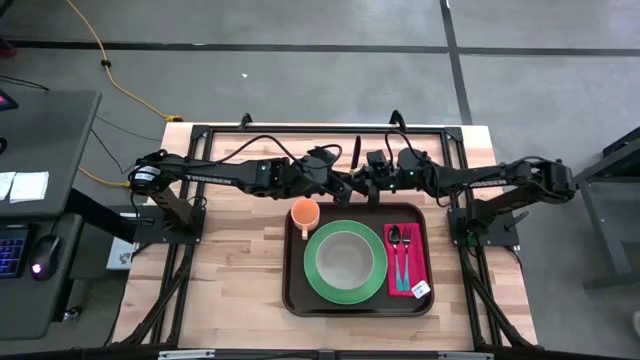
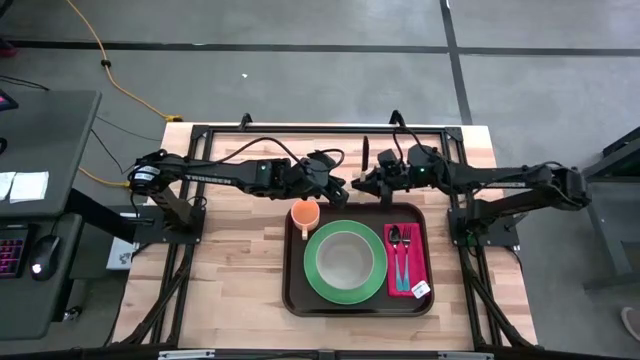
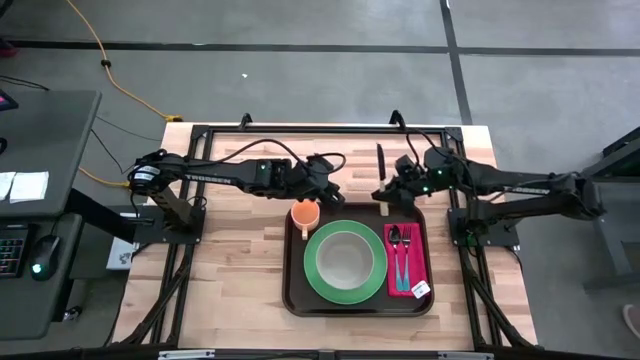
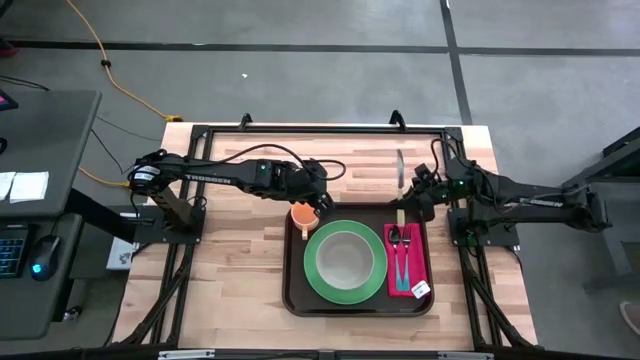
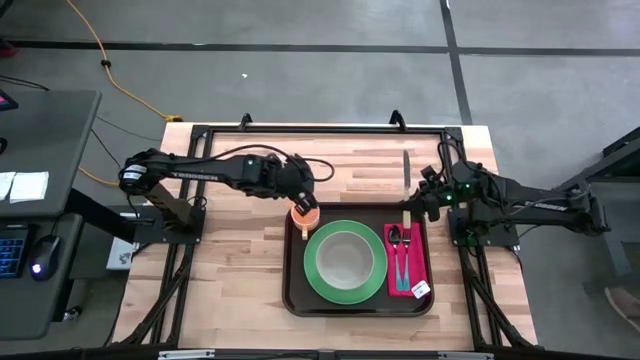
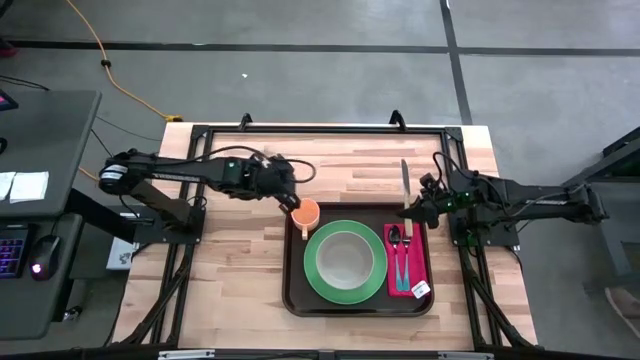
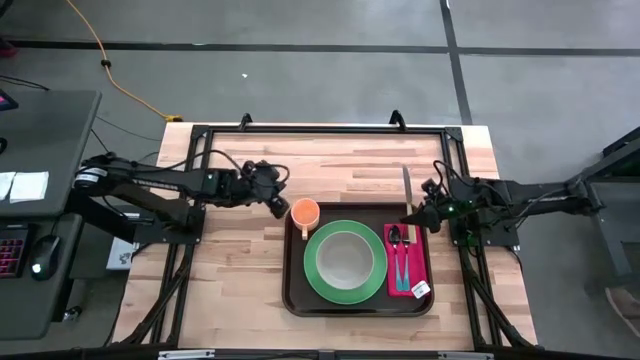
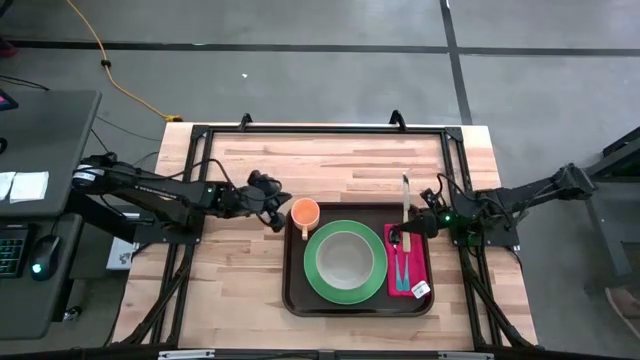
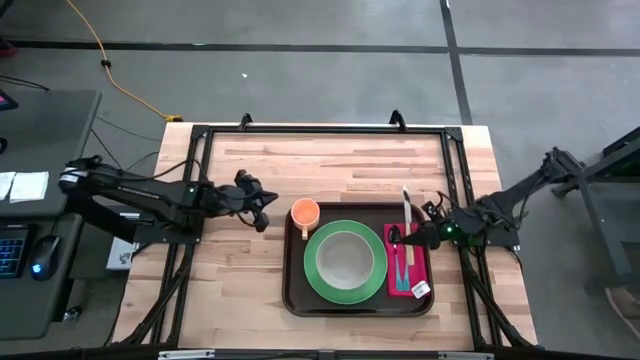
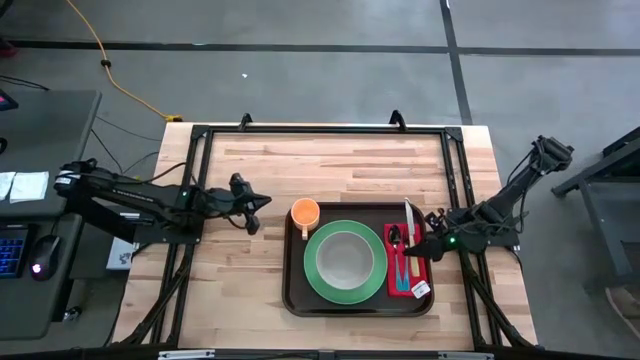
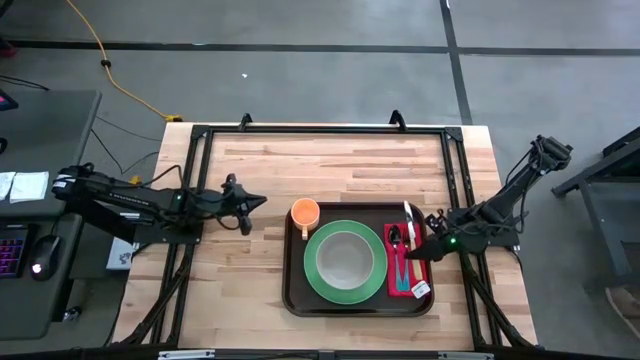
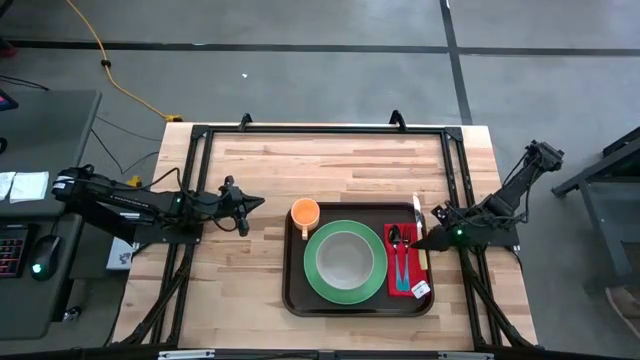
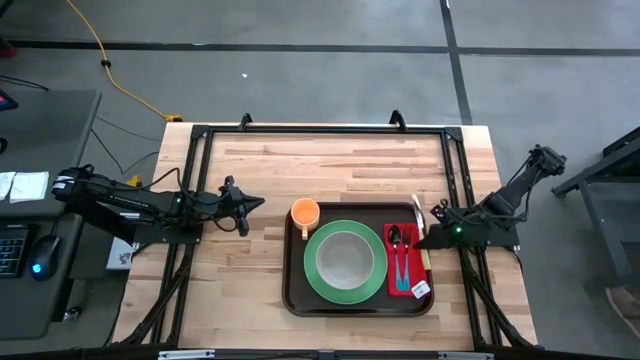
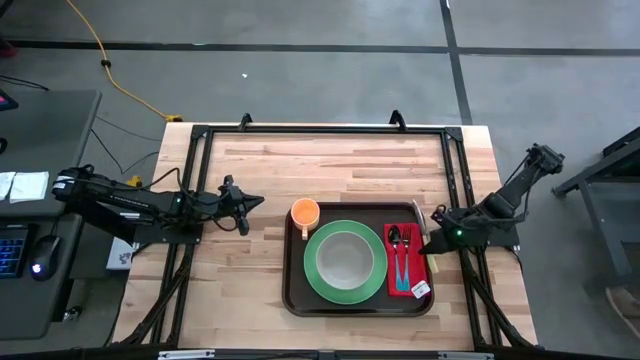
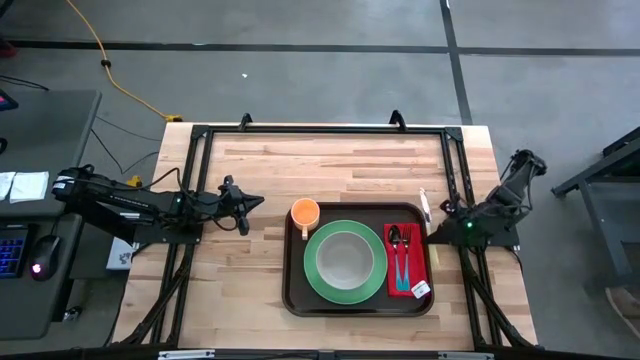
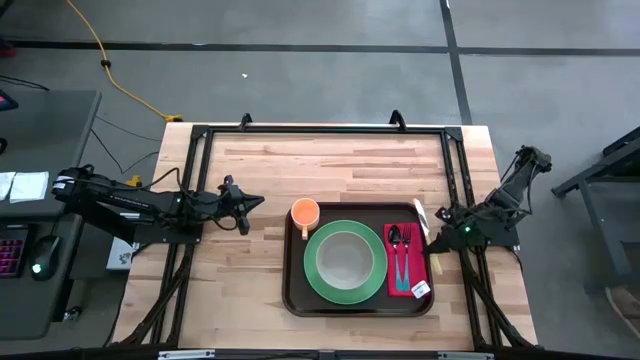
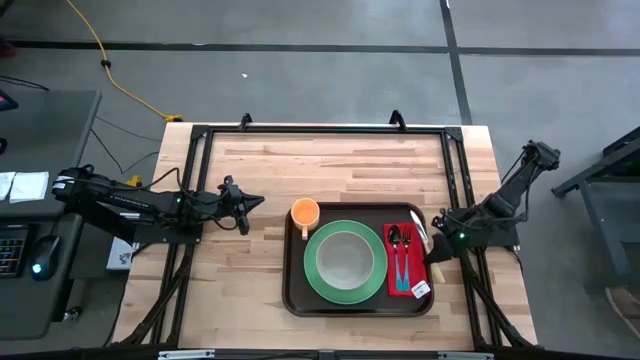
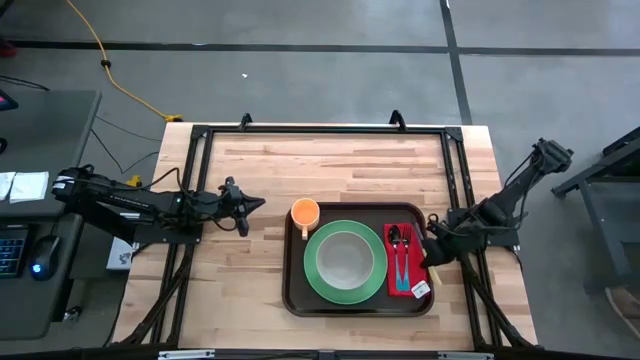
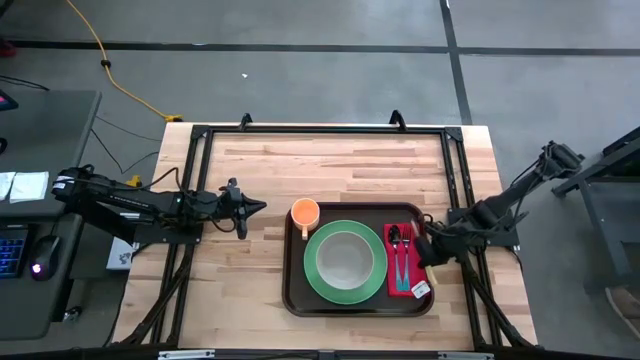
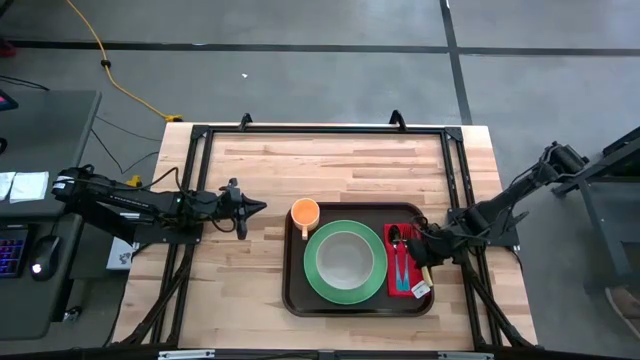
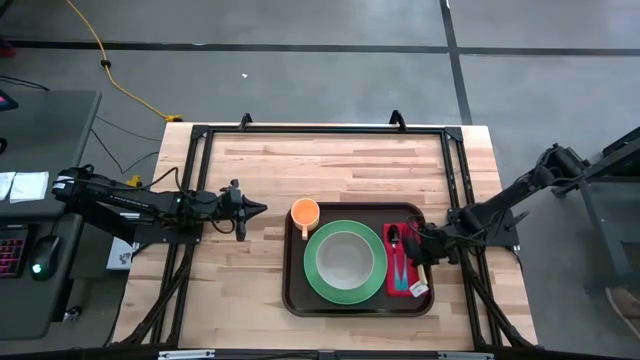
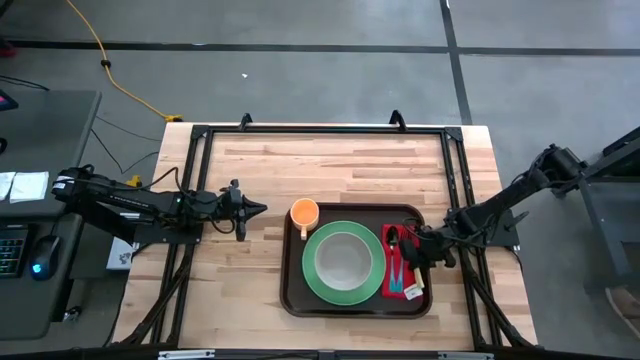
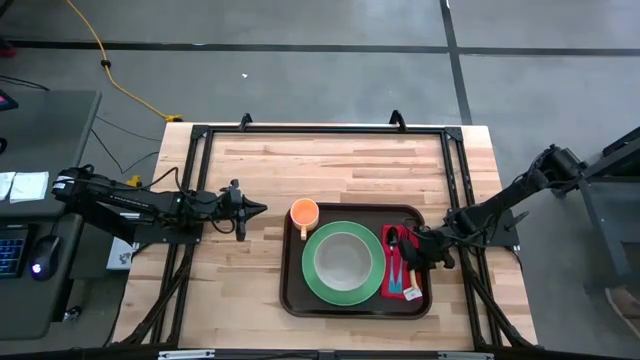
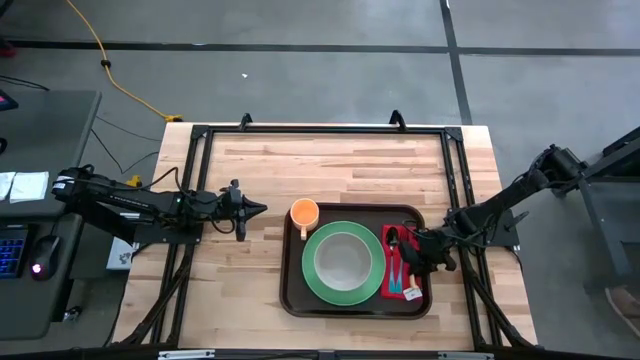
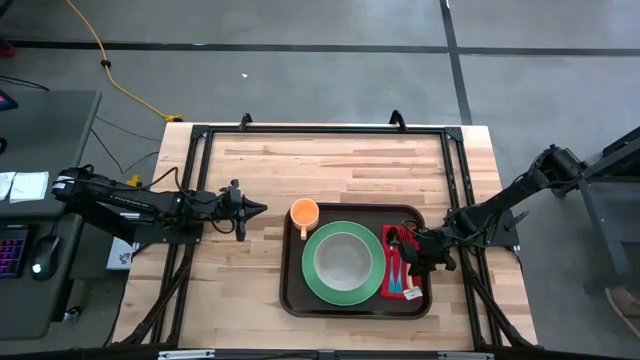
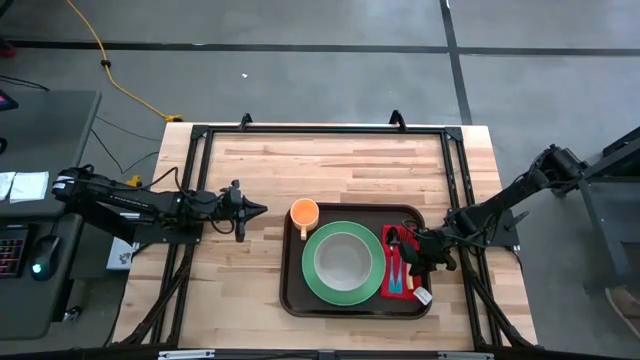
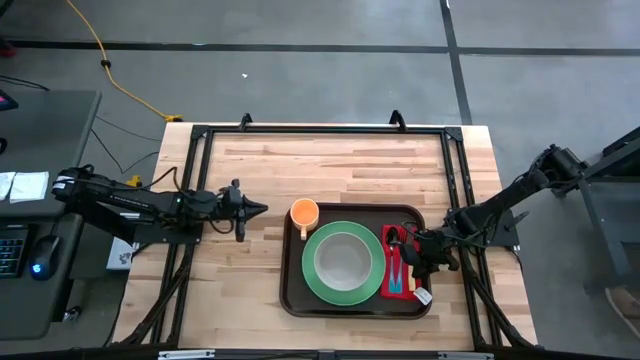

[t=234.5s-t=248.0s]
Task: Set up tray
Put the yellow knife to the right of the blue fork on the red napkin

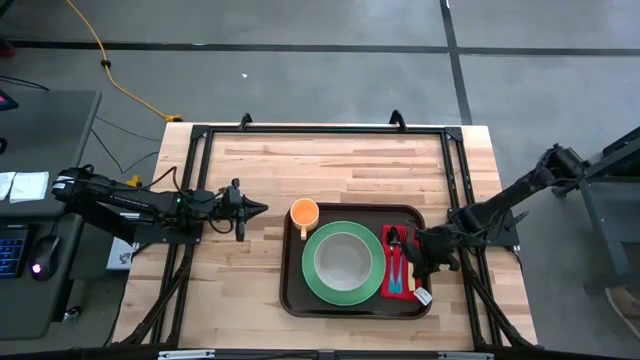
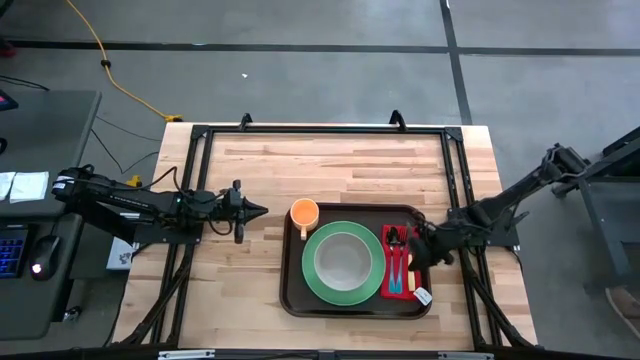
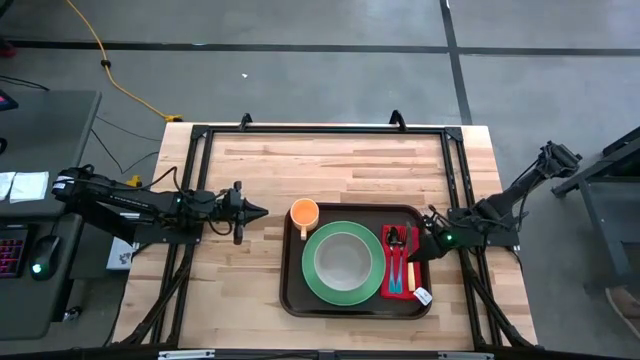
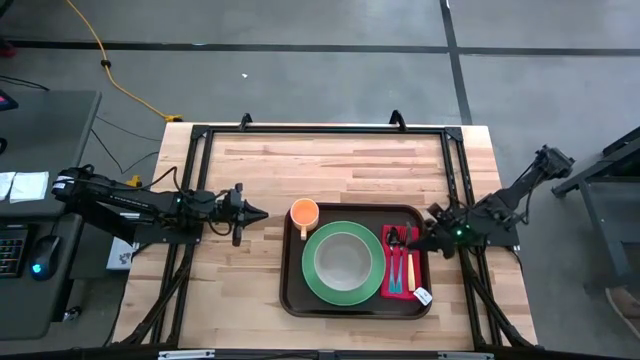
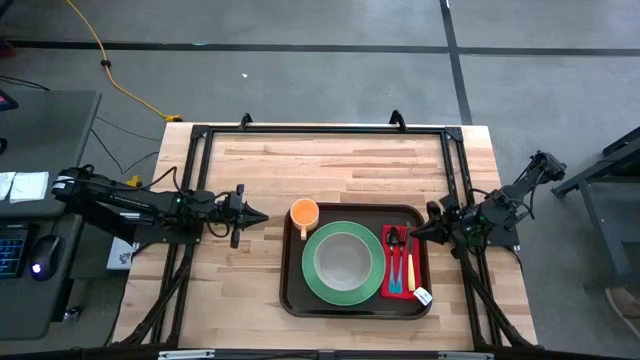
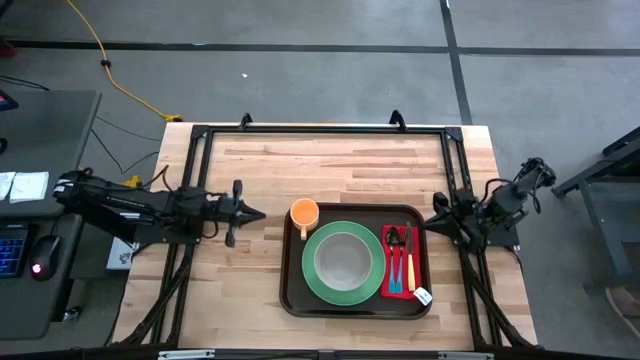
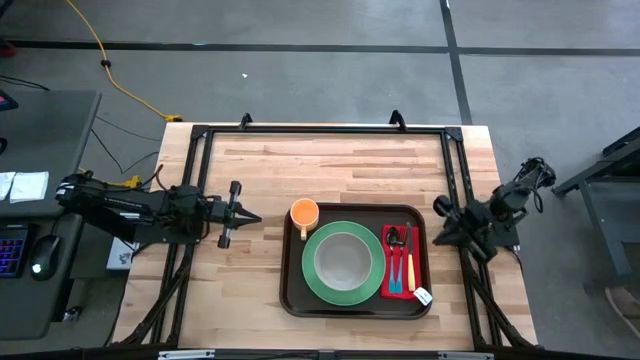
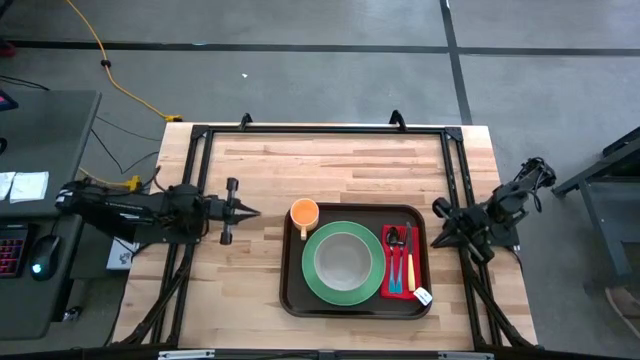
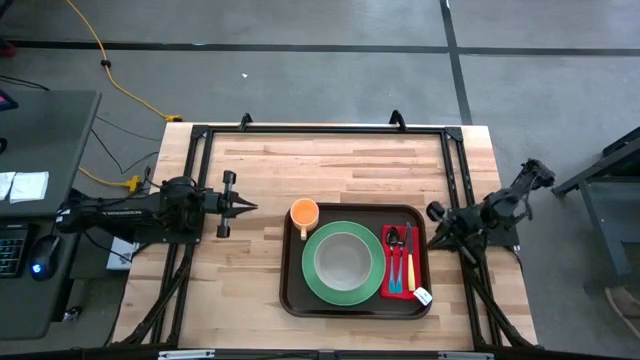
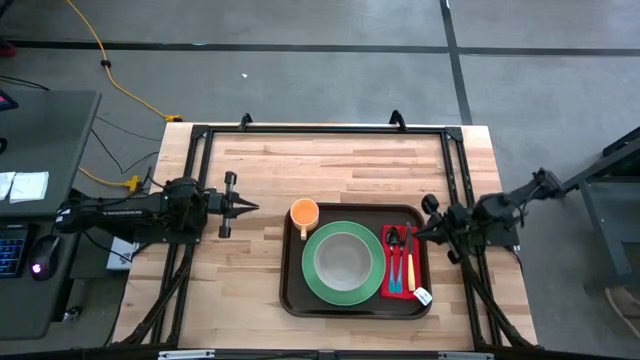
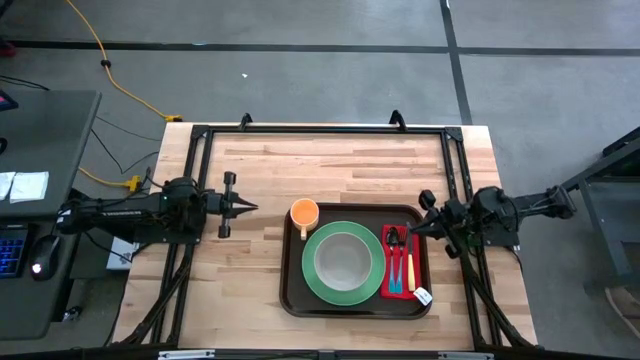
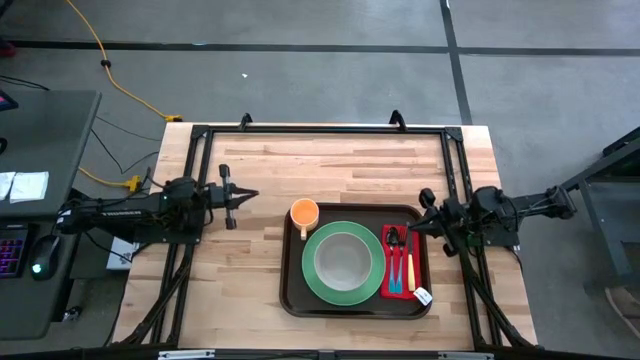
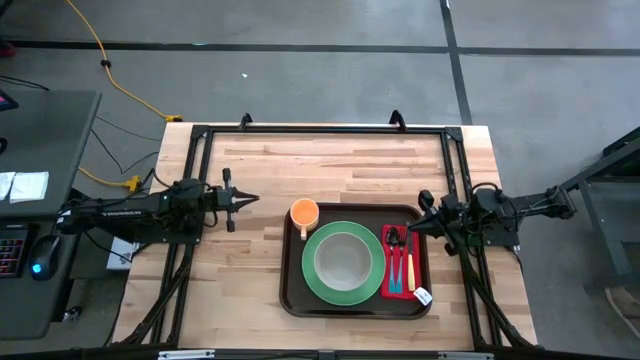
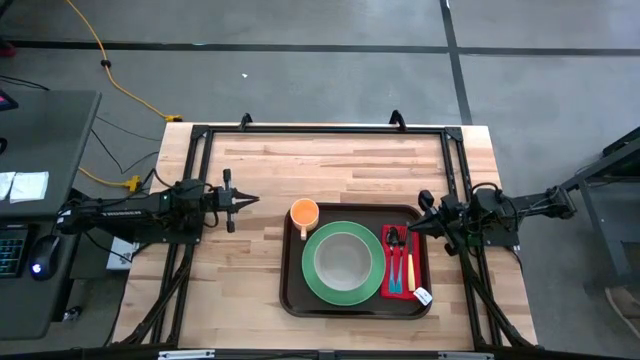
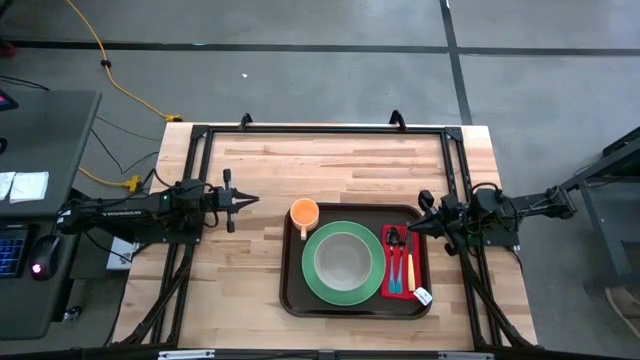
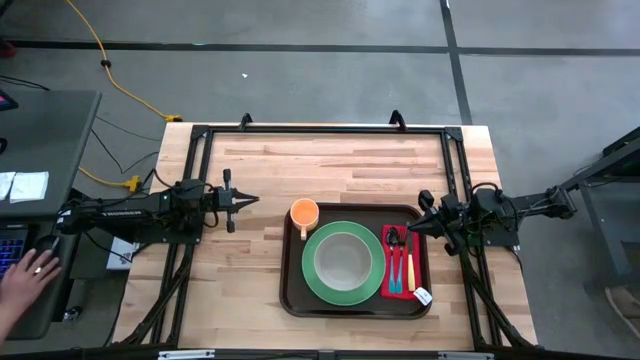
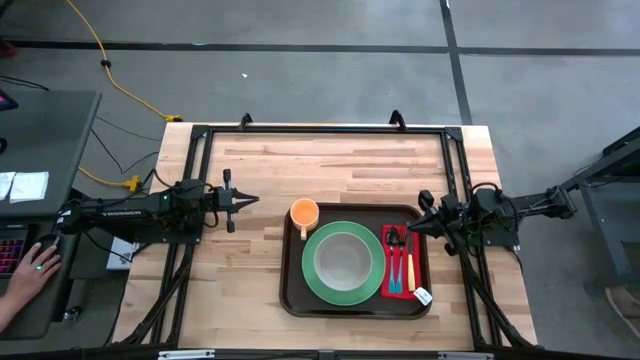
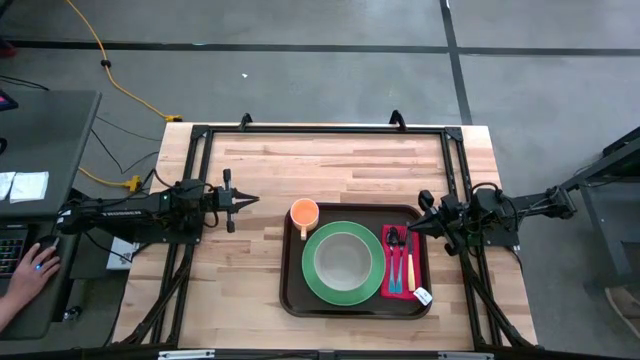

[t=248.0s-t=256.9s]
Return to Home Position
